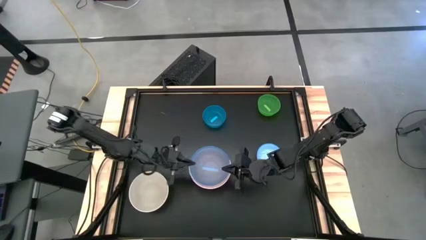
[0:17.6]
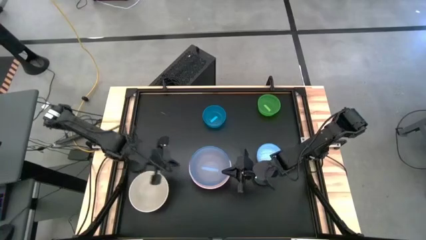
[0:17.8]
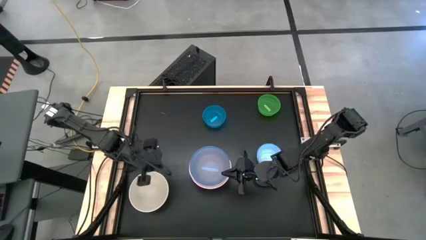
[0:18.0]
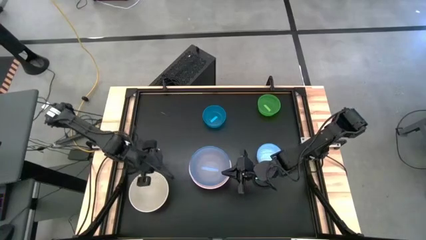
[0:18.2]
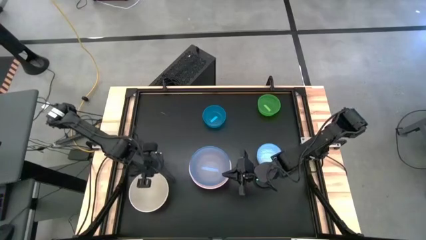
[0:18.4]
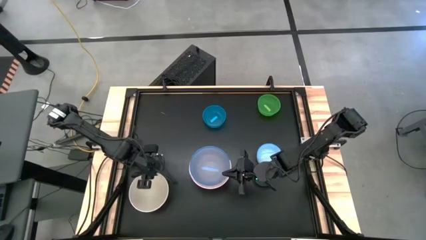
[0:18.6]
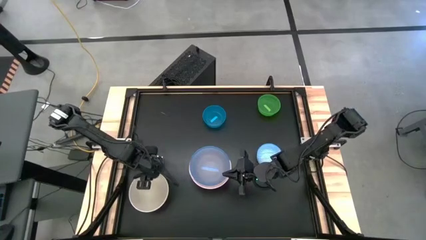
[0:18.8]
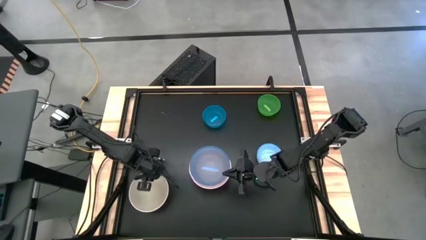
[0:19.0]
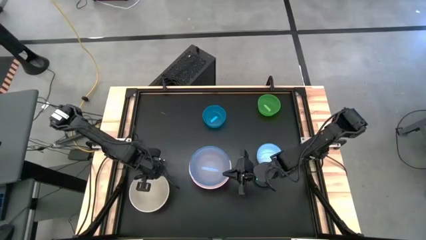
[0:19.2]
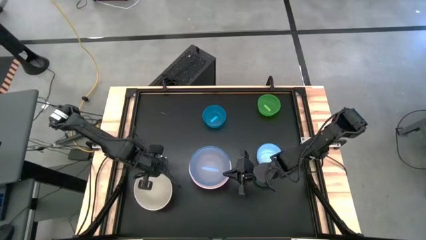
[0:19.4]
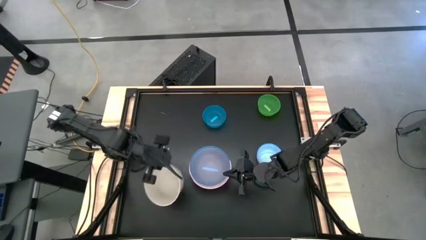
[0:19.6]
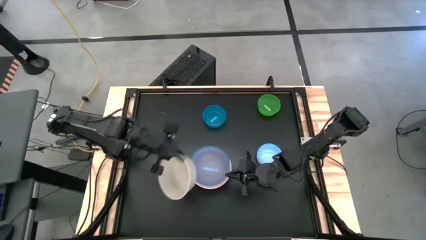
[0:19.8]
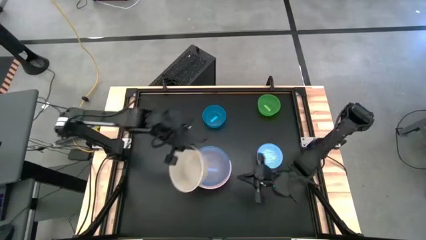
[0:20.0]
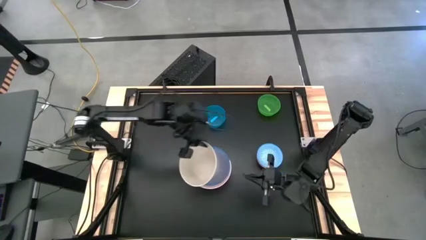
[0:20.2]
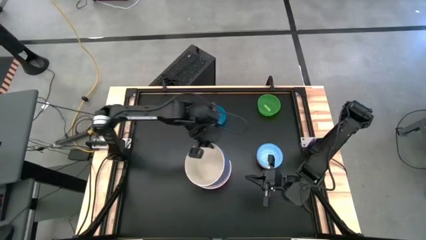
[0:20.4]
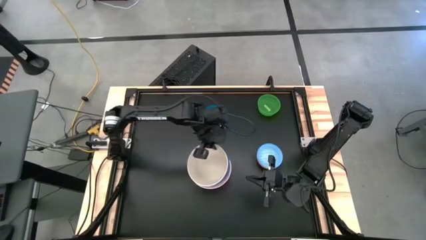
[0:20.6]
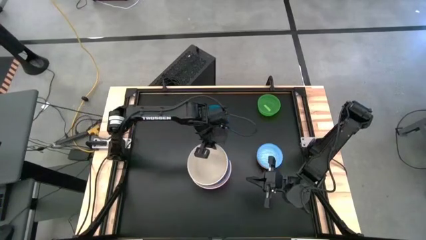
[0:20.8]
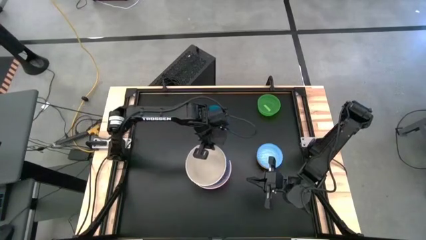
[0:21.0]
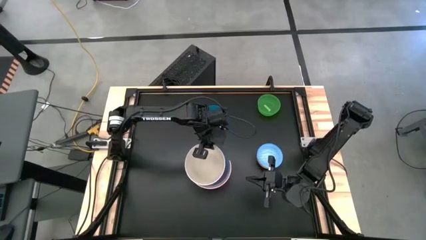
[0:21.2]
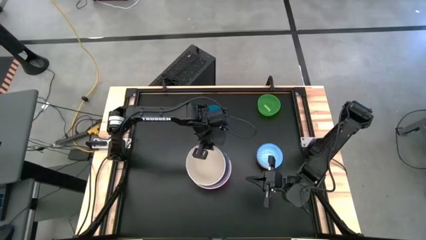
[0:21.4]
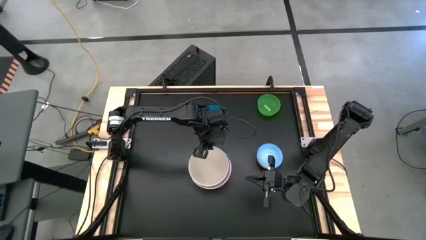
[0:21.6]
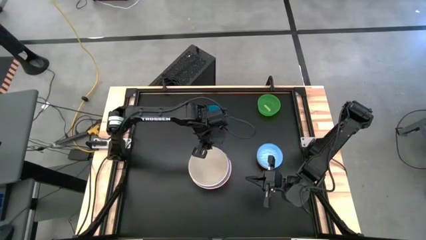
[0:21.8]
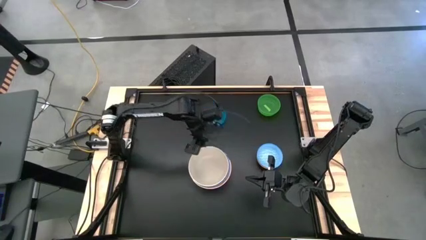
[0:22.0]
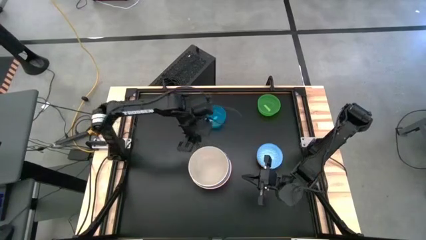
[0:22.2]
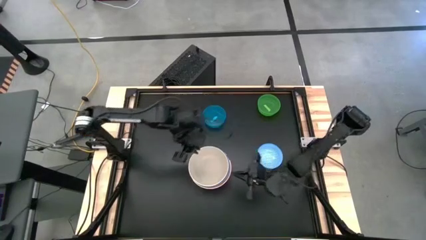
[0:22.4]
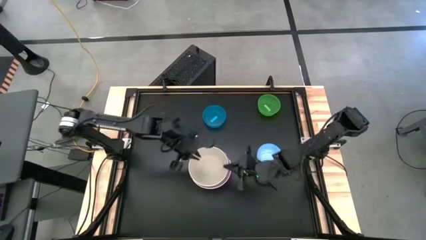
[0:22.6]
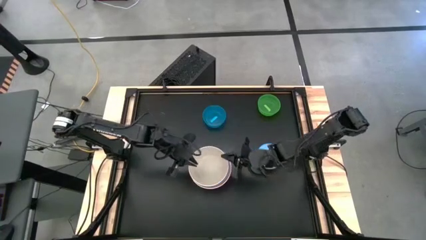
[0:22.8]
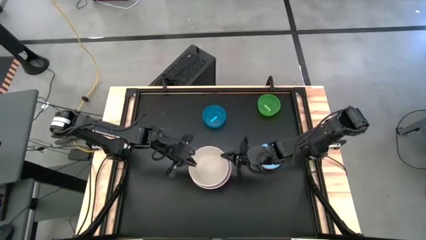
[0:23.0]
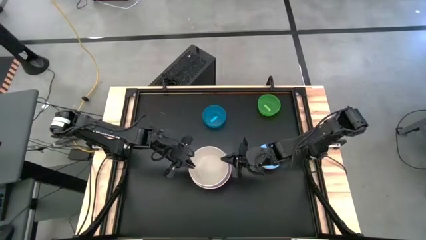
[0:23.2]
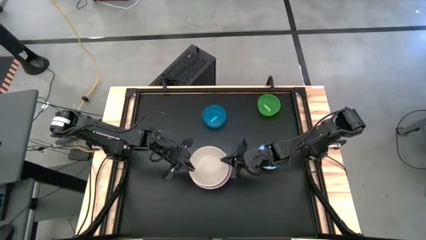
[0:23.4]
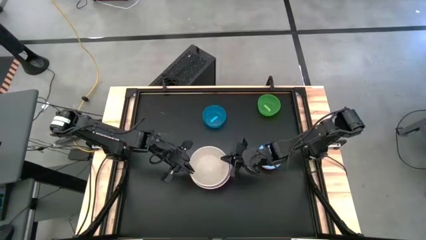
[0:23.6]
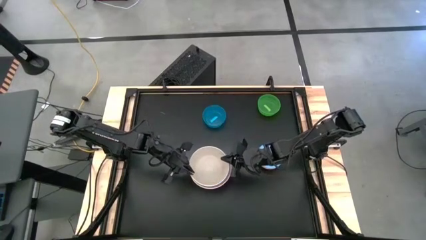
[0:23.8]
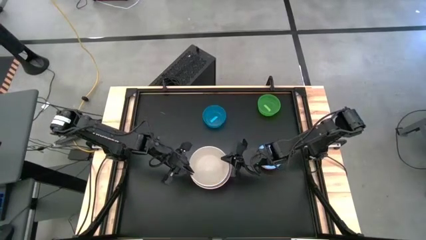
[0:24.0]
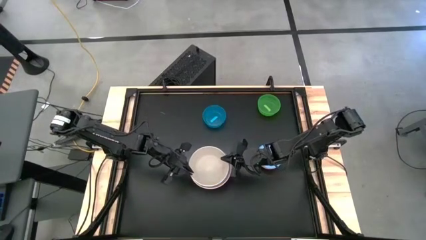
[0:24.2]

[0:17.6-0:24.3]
Stack the white bowl into the transparent blue bowl

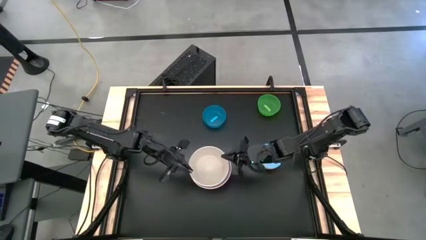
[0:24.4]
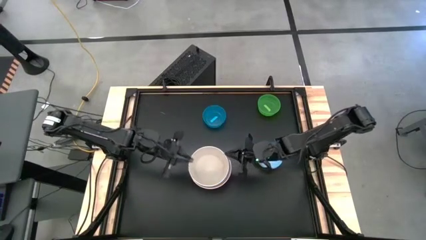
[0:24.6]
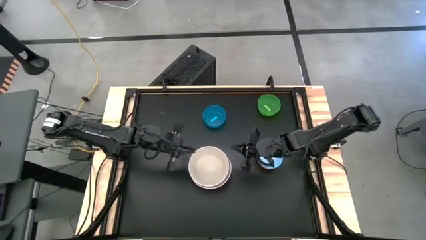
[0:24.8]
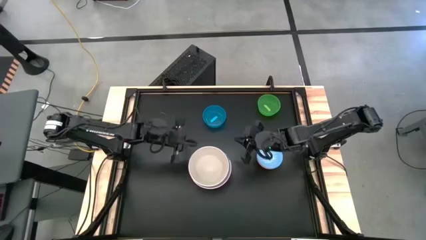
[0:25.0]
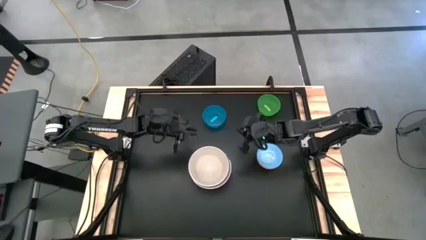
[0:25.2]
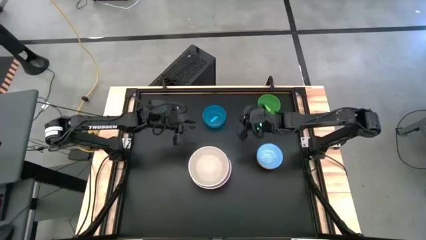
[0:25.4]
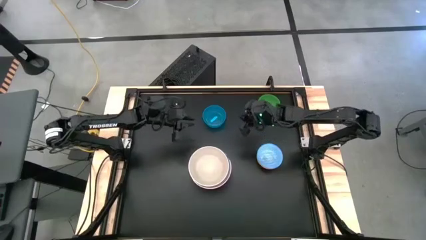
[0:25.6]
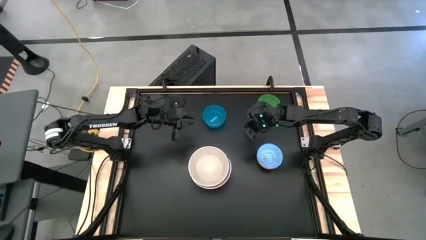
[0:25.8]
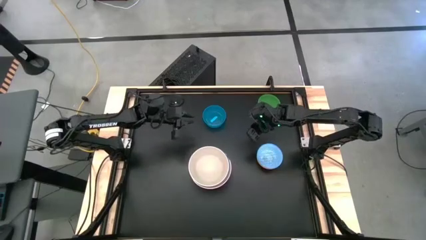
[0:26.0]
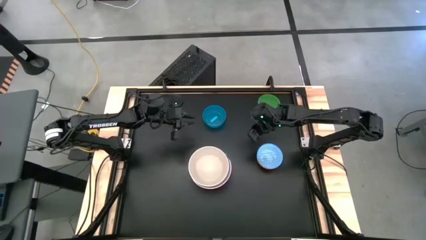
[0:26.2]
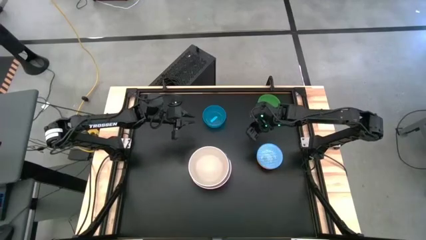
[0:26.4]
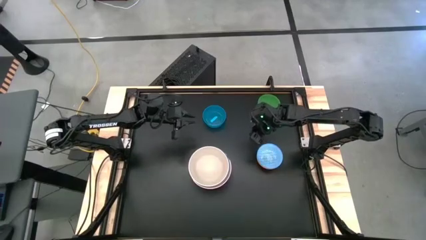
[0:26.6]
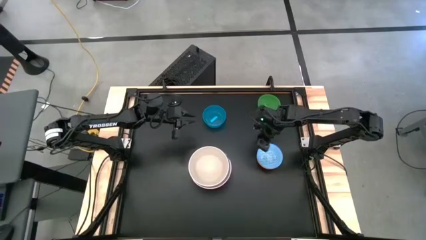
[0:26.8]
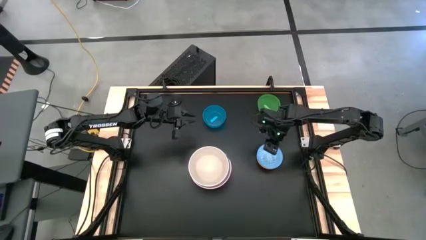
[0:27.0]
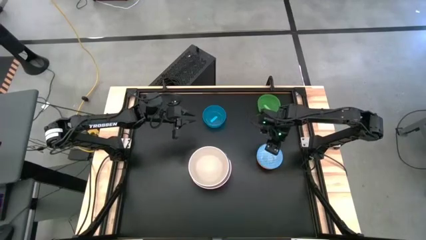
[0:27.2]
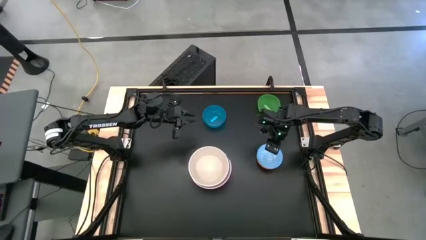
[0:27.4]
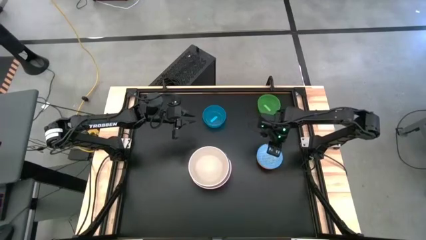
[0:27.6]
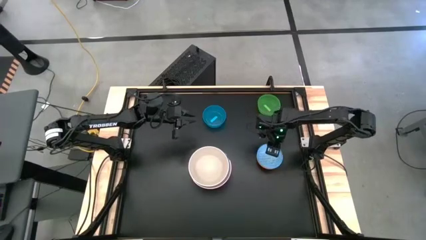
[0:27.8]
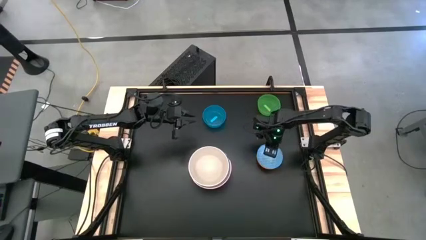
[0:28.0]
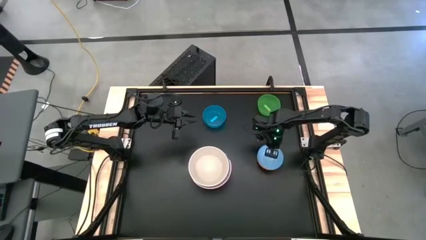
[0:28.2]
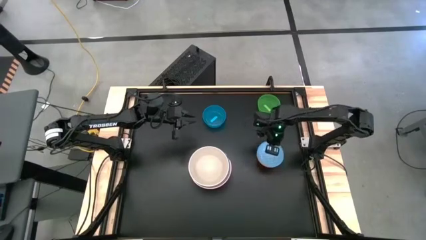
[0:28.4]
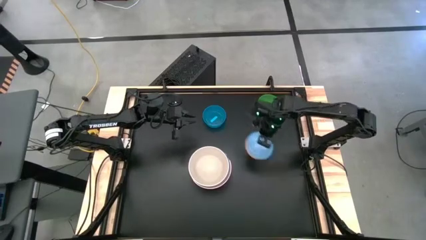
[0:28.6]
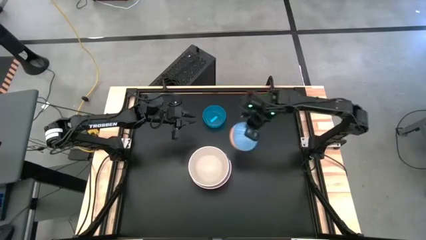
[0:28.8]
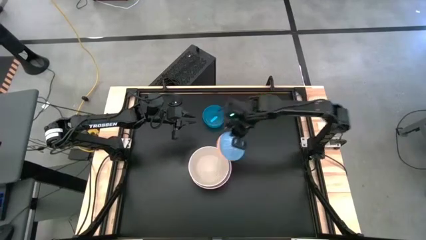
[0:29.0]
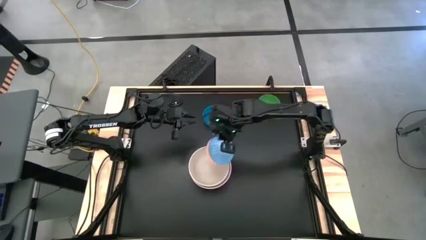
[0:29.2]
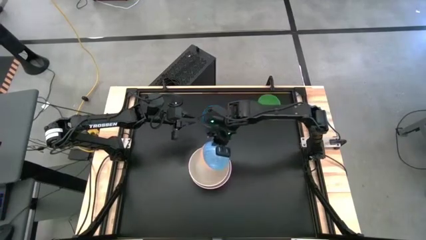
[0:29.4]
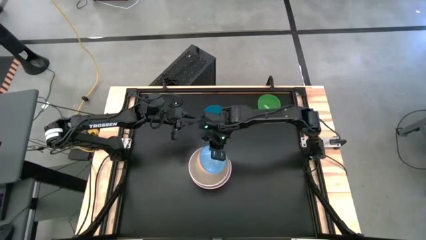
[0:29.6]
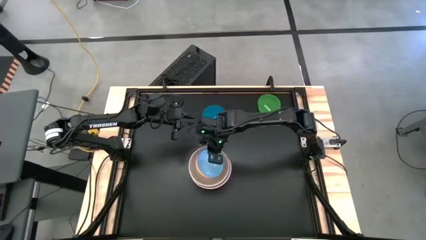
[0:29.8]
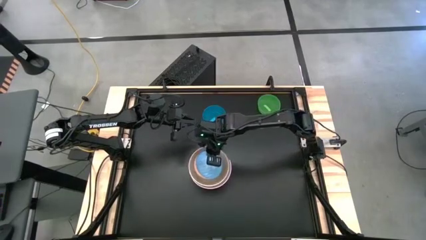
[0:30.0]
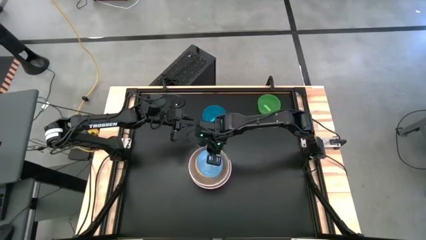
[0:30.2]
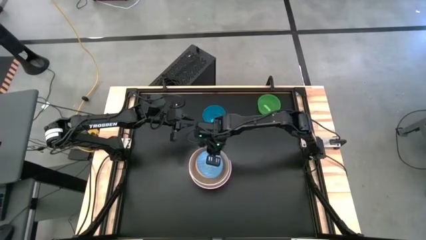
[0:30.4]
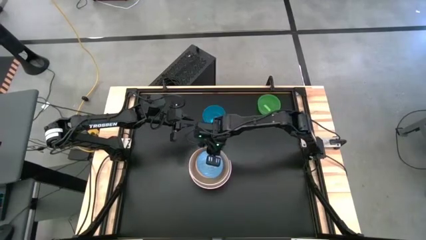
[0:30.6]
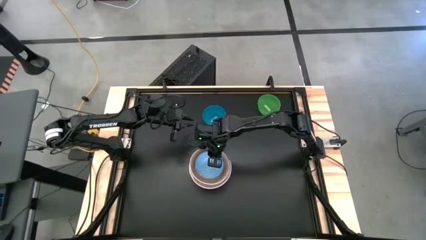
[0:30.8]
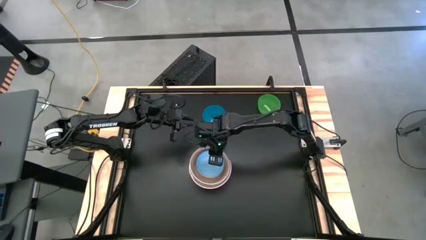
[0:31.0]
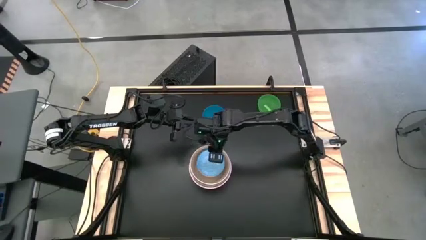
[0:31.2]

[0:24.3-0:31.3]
Stack the blue patterned bowl into the white bowl

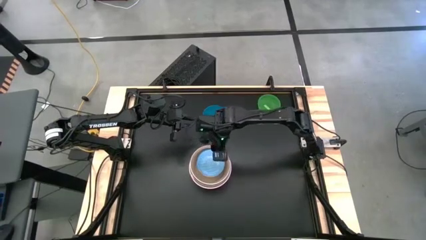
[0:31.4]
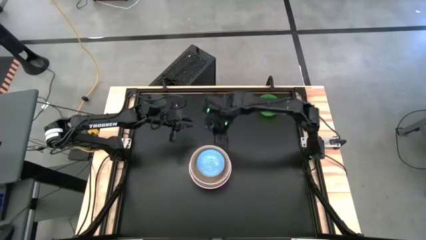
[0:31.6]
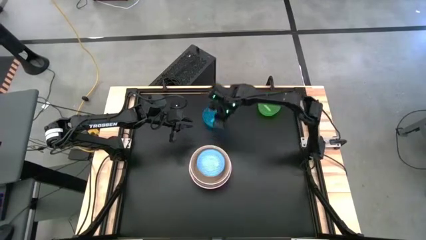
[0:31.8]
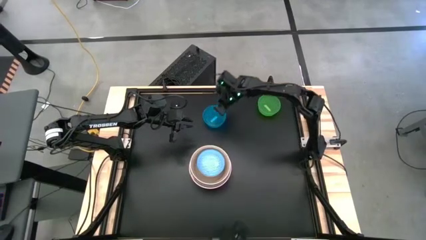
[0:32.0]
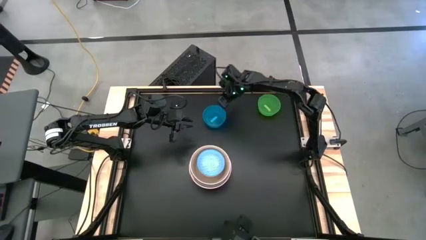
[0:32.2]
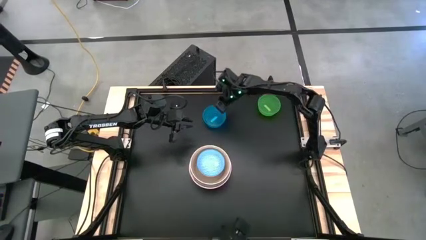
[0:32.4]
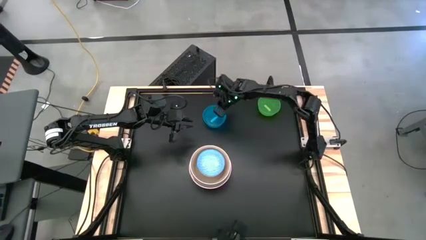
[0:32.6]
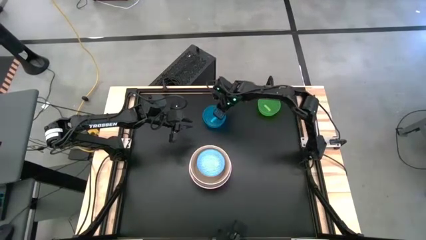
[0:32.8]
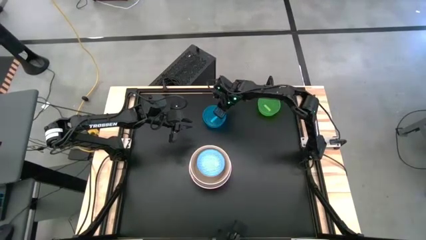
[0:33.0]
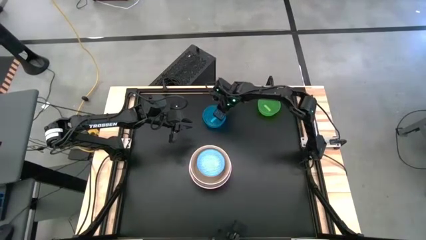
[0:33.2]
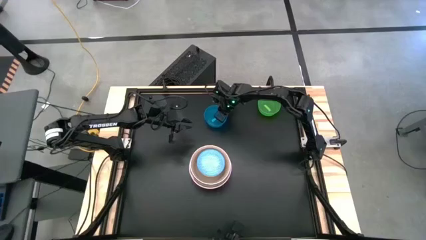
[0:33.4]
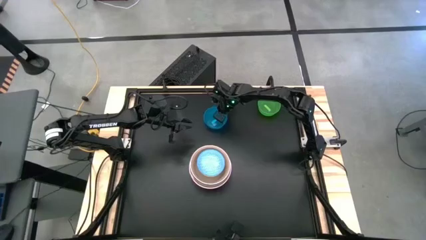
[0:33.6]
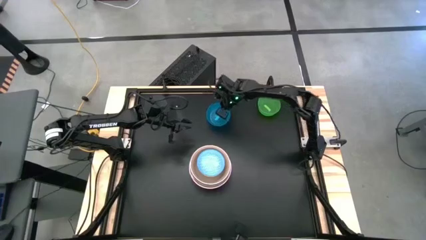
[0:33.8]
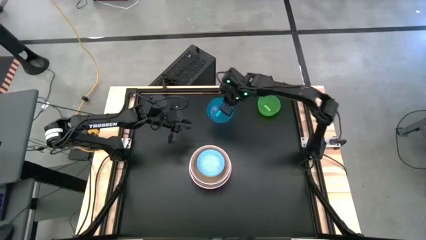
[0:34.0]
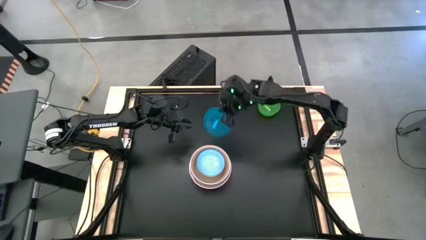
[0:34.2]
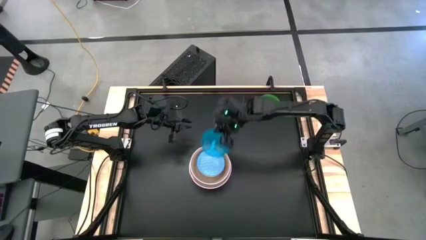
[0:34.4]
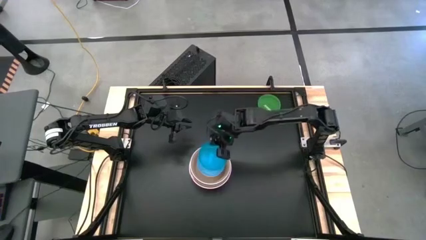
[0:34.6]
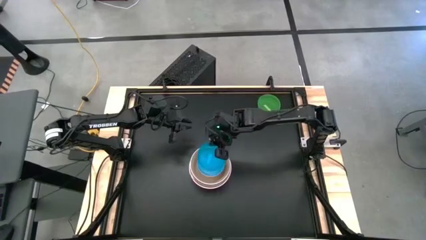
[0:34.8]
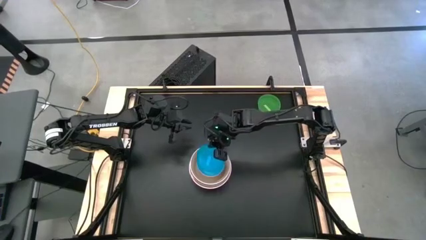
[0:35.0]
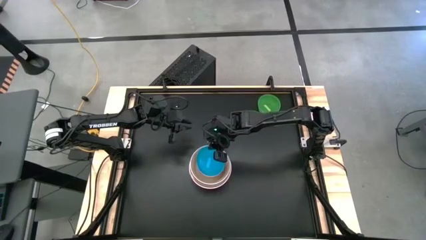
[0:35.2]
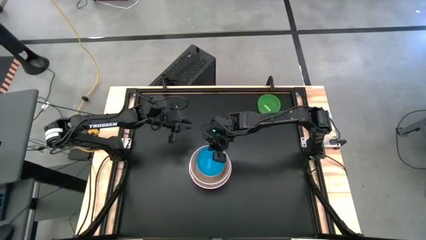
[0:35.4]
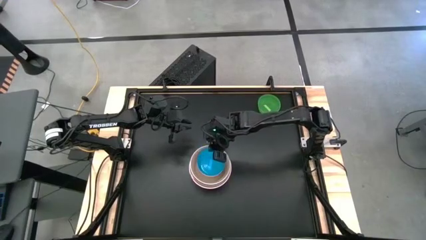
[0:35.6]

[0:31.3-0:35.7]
Stack the transparent blue bowl into the blue patterned bowl
